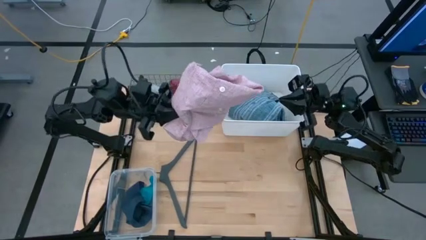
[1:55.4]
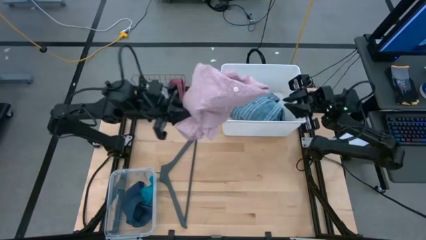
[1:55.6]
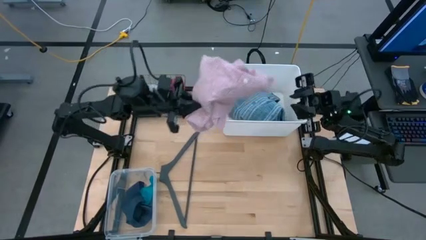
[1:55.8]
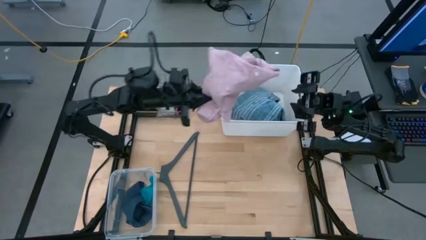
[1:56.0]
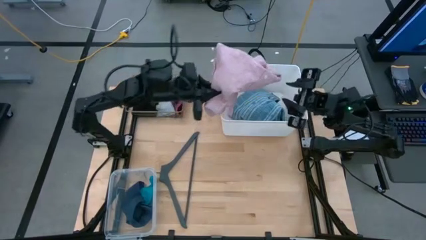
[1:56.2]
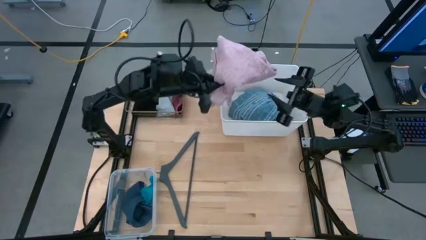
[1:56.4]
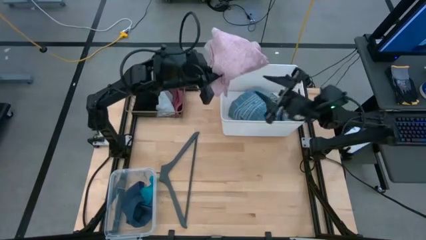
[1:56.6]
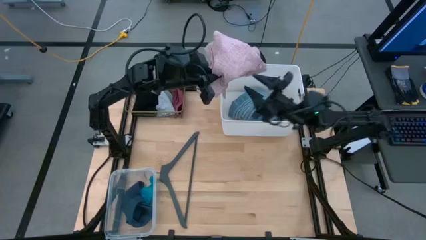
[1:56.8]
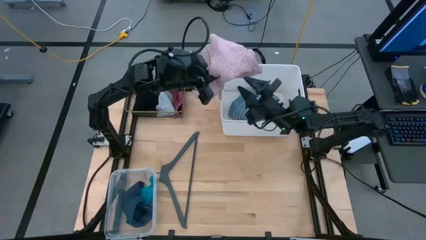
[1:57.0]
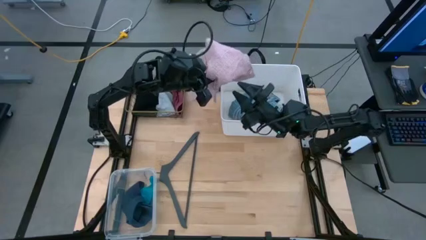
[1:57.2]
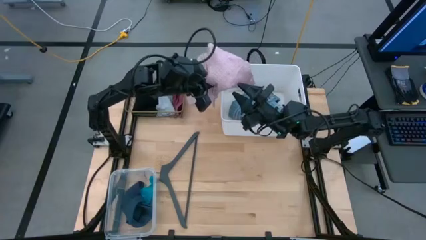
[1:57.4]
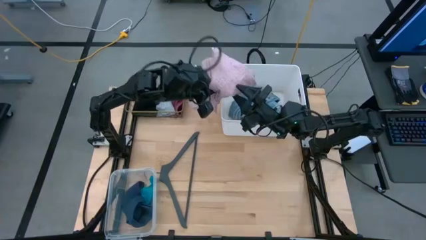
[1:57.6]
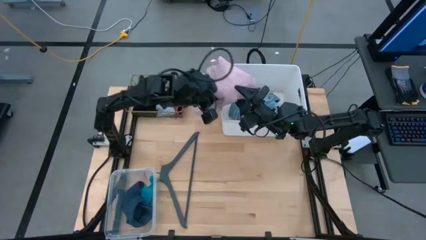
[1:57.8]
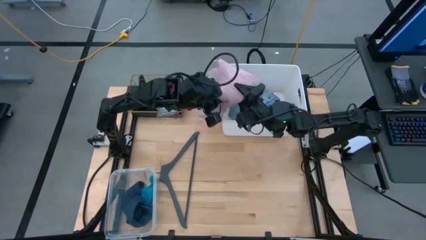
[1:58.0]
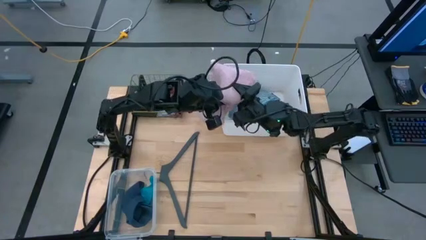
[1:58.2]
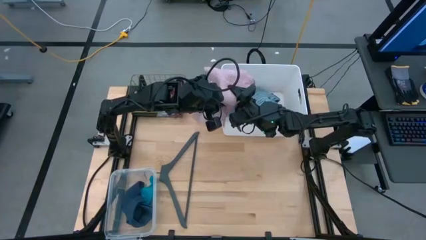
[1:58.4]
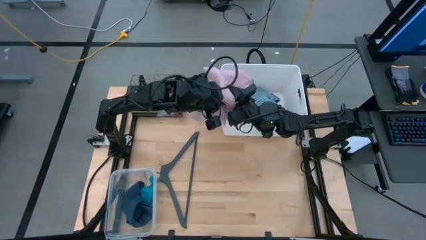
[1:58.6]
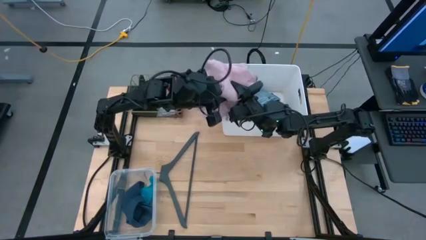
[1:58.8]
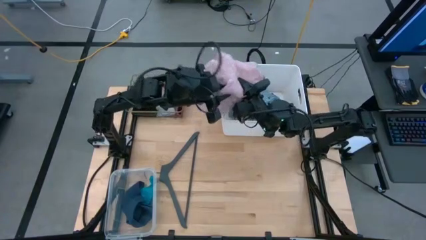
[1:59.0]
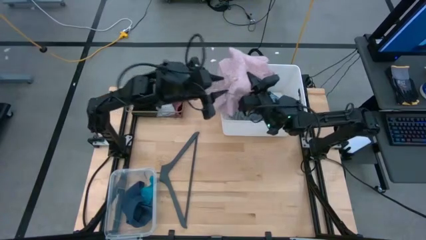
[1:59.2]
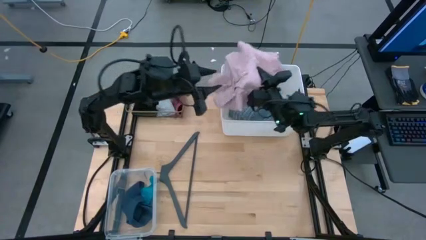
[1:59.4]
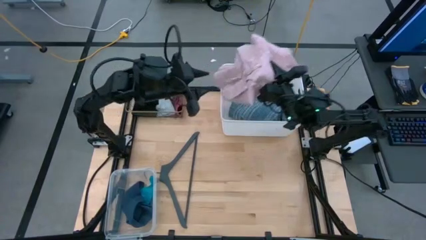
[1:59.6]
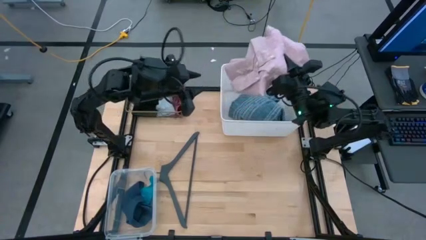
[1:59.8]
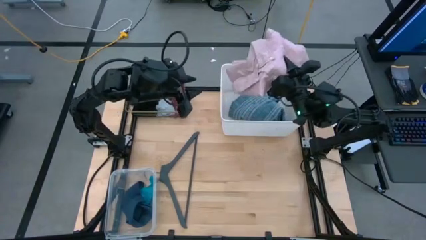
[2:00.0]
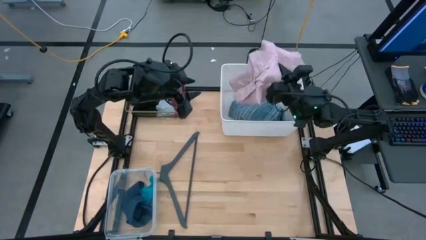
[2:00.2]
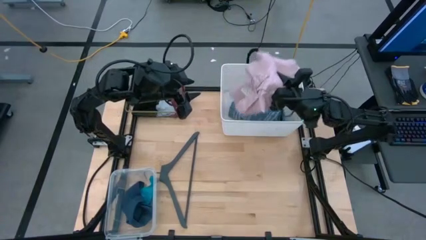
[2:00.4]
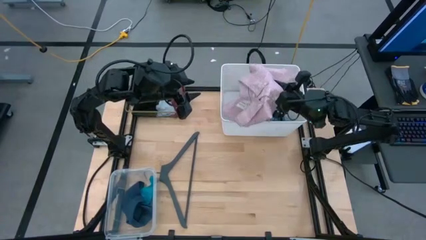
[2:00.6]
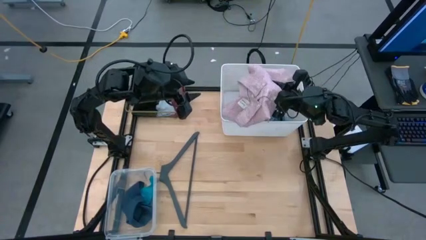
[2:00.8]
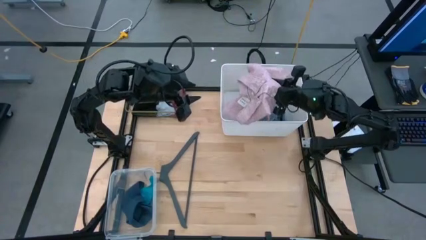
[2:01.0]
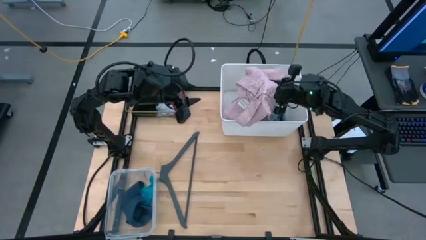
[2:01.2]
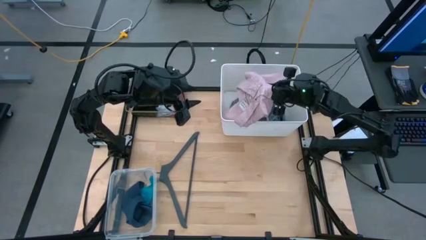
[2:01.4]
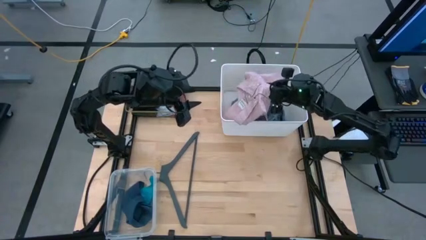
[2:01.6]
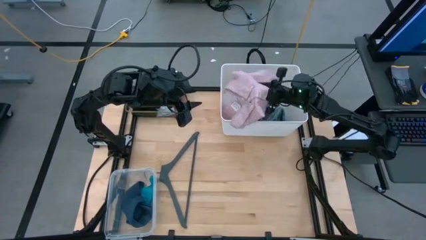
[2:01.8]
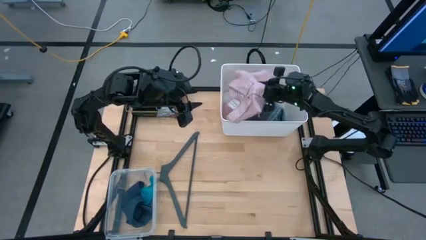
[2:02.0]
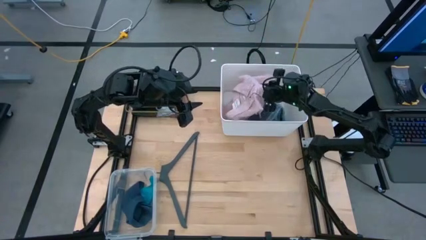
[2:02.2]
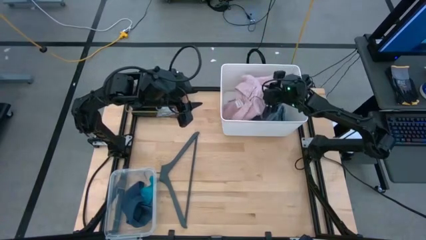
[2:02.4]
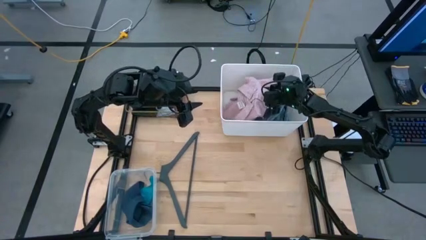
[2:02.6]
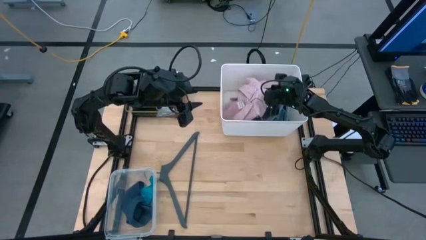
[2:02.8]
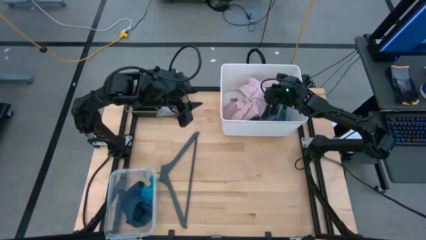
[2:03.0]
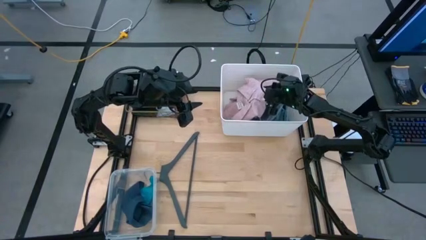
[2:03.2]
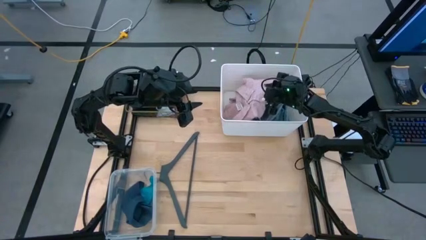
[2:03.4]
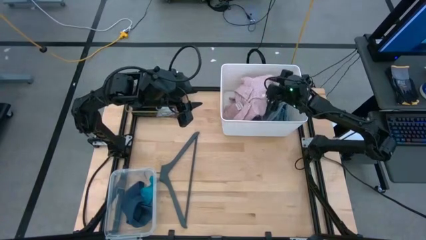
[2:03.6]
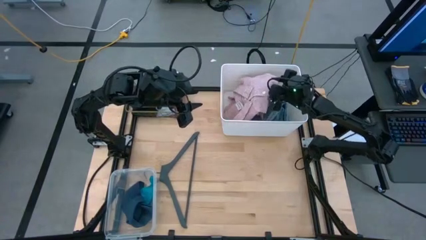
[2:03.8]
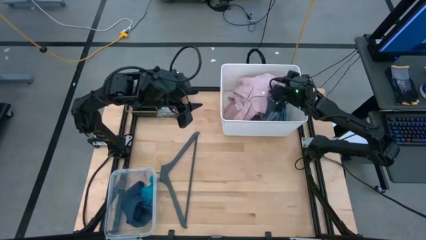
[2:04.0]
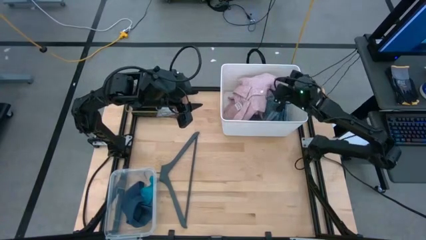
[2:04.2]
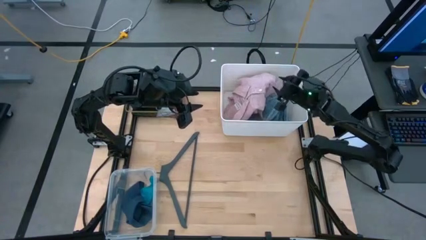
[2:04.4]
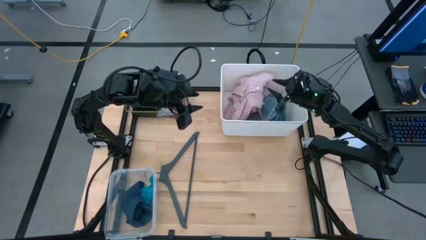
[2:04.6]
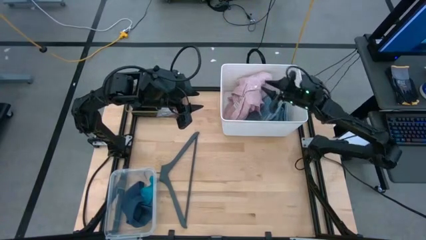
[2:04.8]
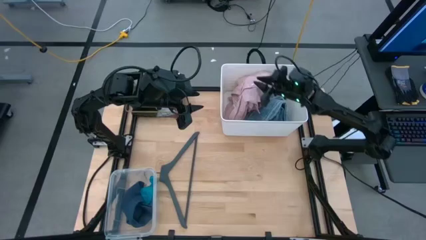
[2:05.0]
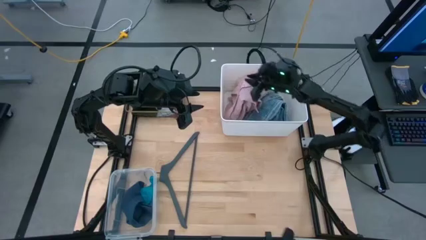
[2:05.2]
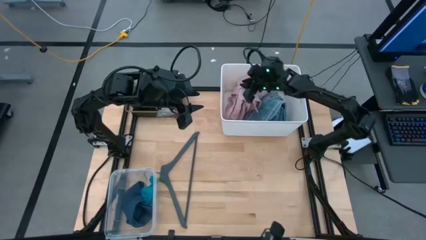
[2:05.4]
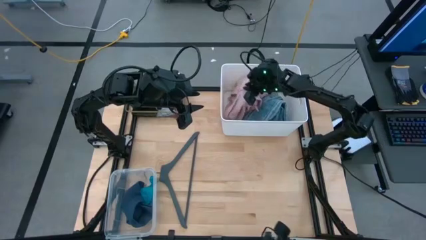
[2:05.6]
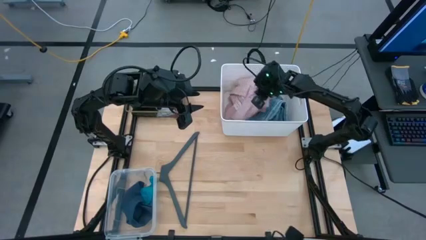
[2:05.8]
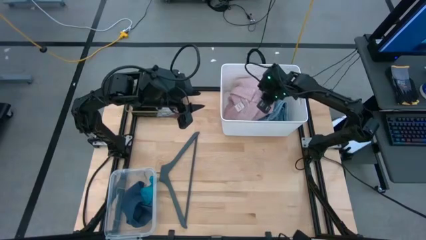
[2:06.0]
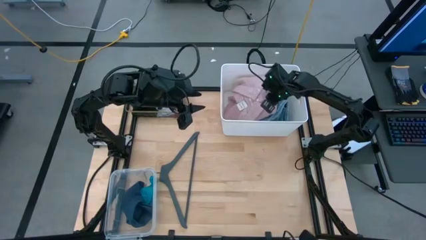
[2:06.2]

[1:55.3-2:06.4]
Task: Pick & Place Cloths
Put the pink shirt into the white bin
